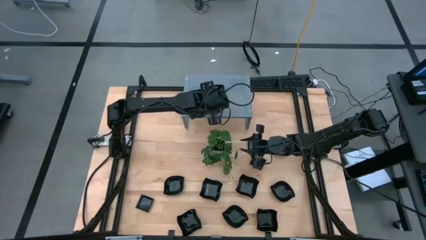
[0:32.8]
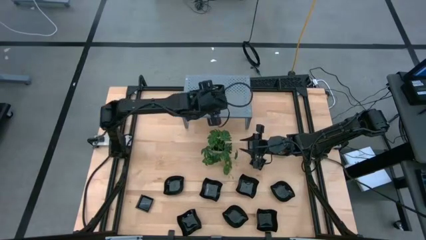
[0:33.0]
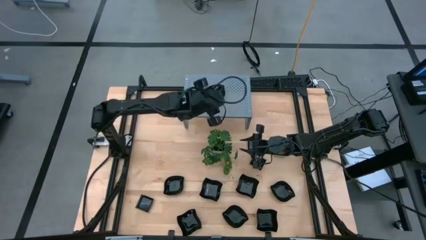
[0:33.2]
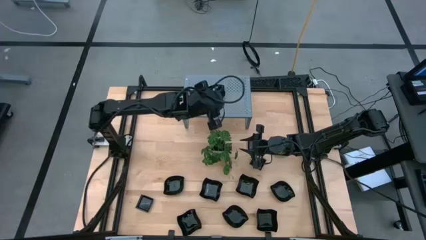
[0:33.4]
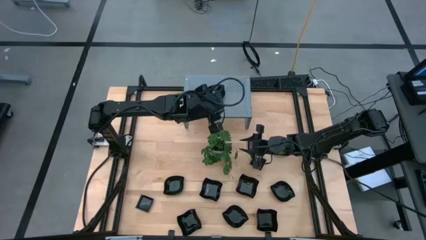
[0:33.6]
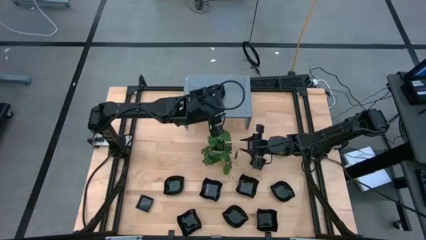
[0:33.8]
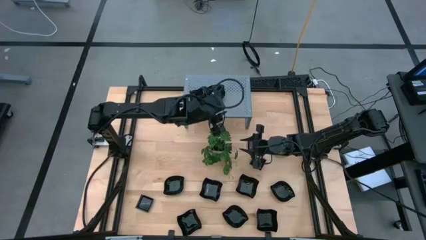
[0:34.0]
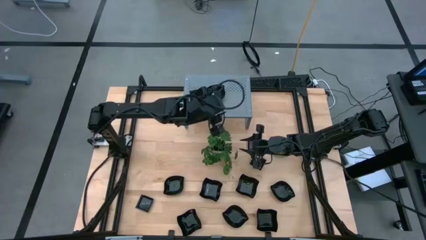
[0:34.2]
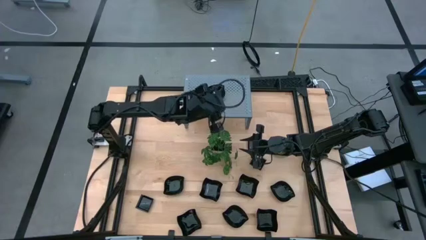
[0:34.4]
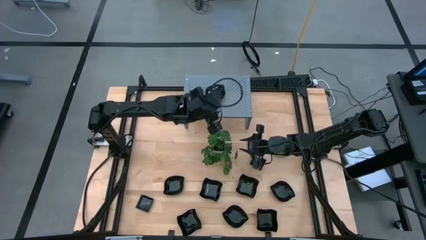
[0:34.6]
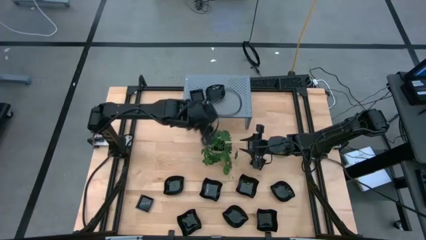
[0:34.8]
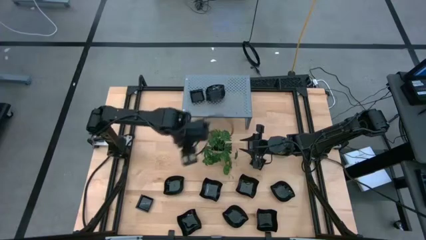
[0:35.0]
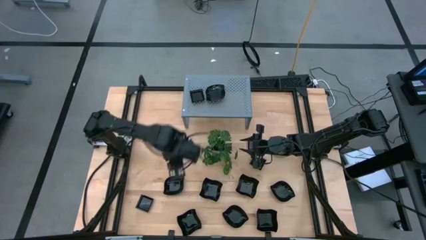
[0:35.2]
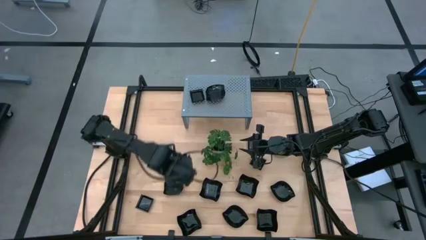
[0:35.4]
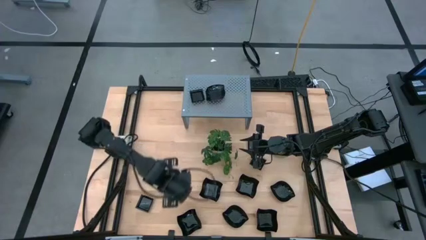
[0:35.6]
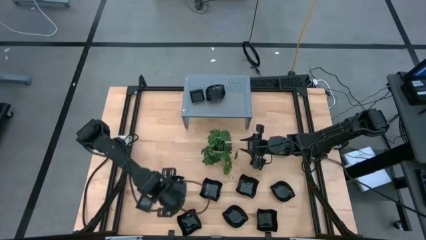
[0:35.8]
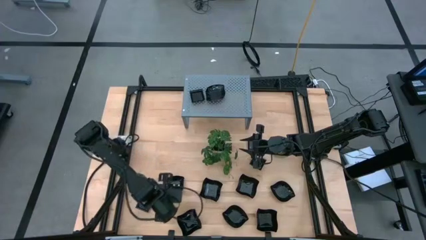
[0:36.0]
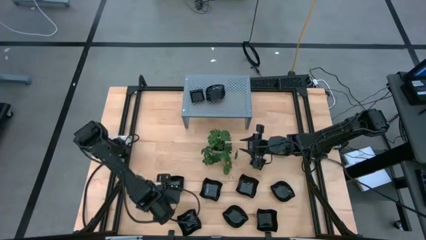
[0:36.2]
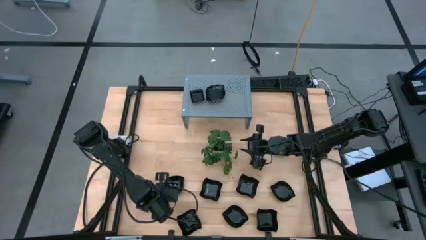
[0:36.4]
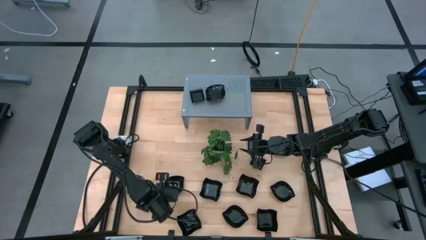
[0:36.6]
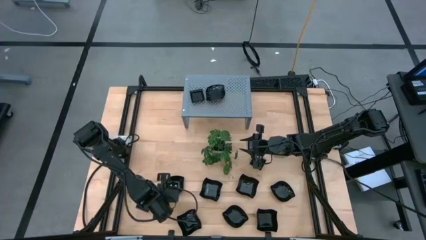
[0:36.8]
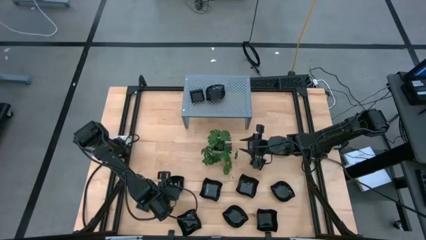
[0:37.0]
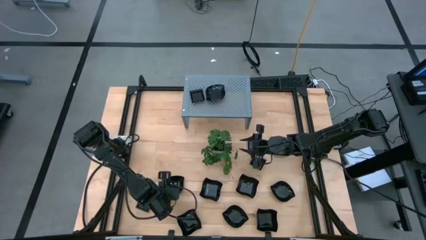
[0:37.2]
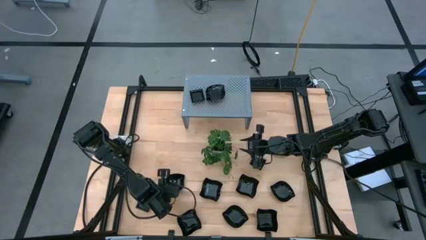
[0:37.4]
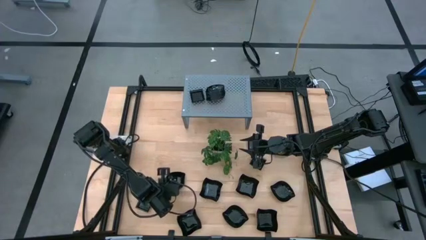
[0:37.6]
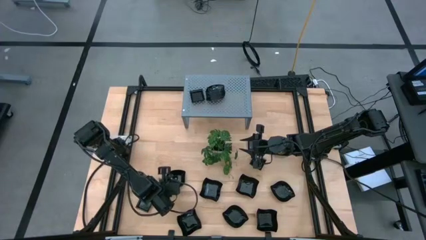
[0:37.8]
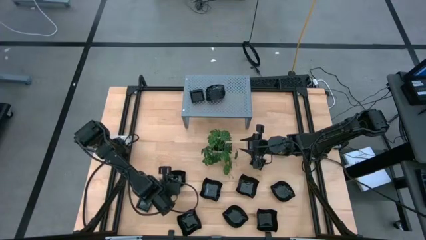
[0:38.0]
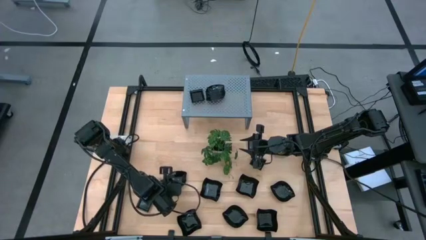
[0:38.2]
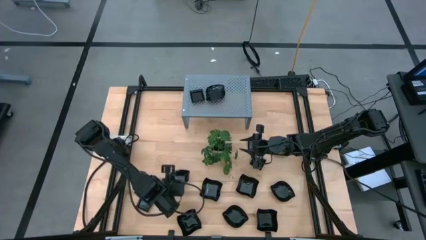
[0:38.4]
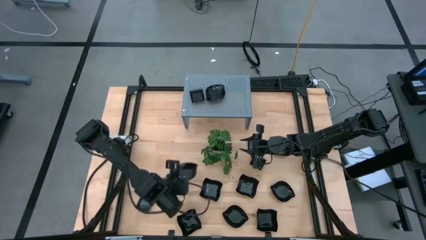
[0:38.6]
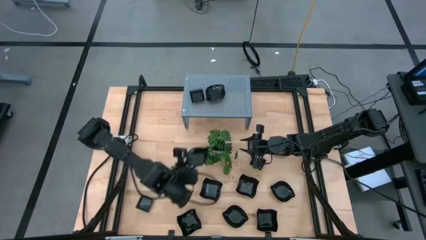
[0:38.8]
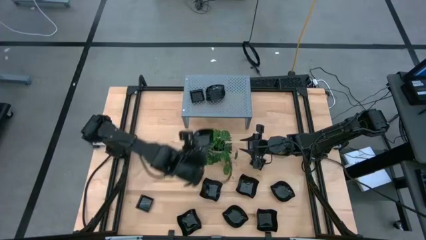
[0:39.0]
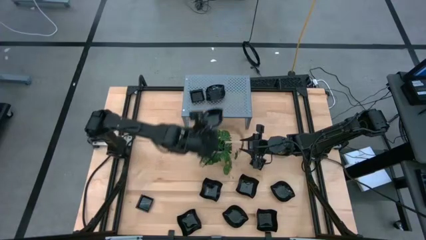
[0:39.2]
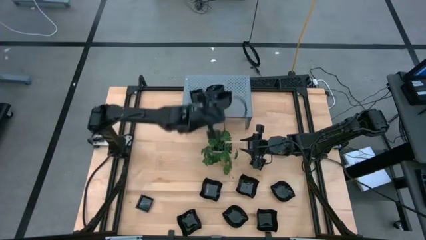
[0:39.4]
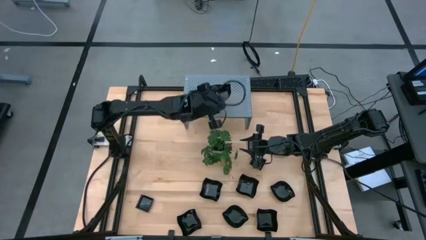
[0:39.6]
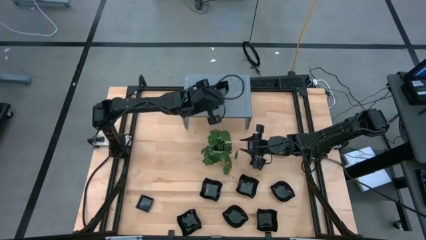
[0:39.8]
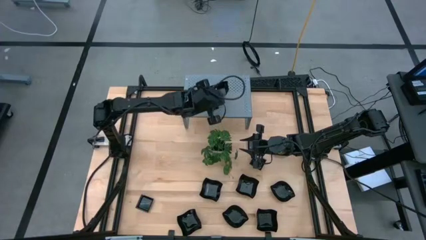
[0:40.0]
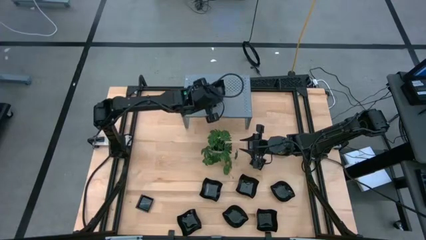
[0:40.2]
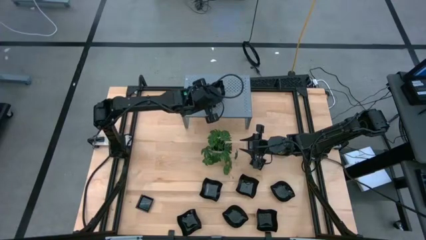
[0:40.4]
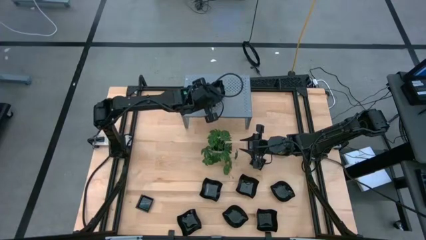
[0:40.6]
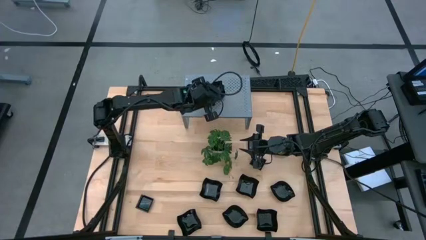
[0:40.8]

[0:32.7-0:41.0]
Task: Pick & Place Mini shaped plates
Stack the black leaf plate on top of the other black leaf plate on the shelf

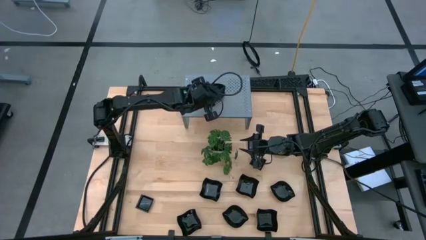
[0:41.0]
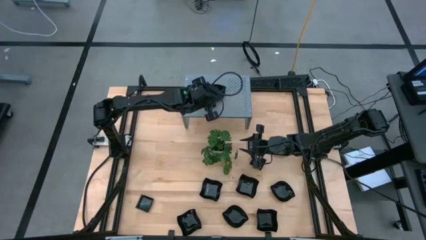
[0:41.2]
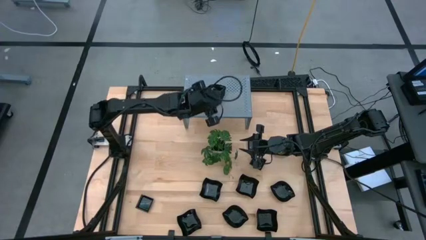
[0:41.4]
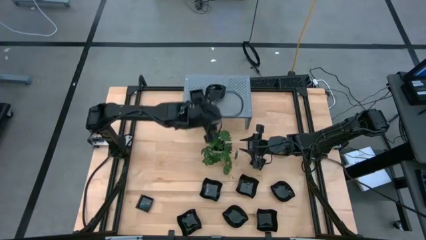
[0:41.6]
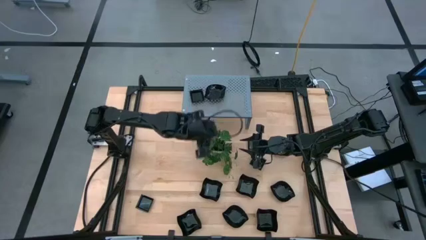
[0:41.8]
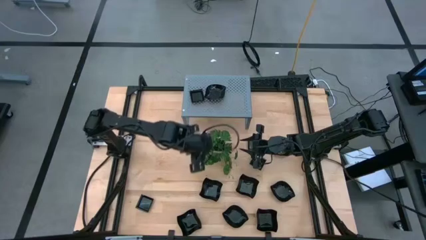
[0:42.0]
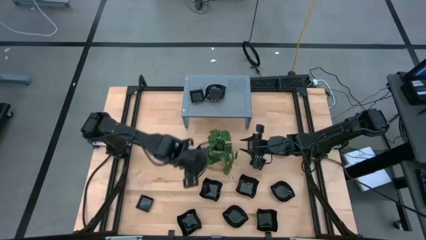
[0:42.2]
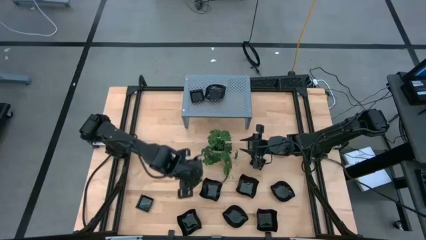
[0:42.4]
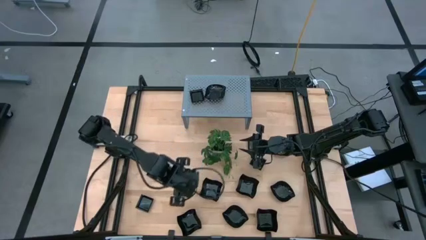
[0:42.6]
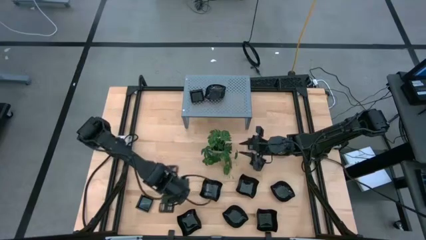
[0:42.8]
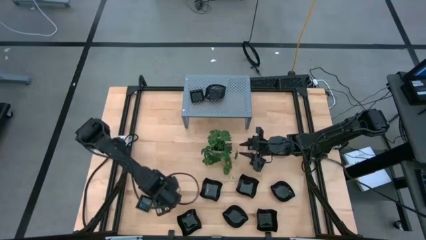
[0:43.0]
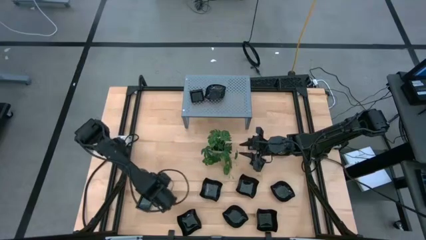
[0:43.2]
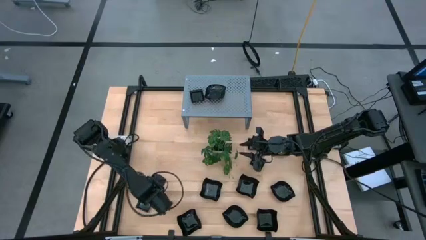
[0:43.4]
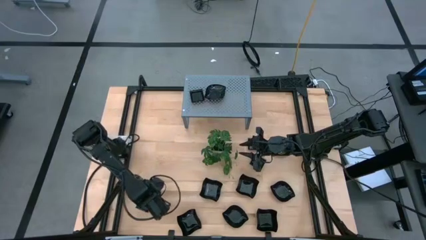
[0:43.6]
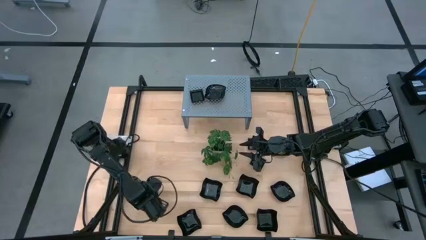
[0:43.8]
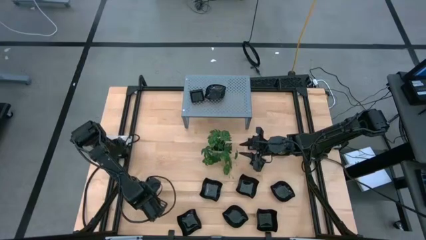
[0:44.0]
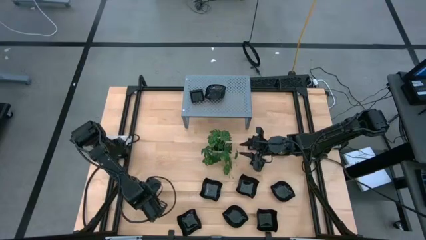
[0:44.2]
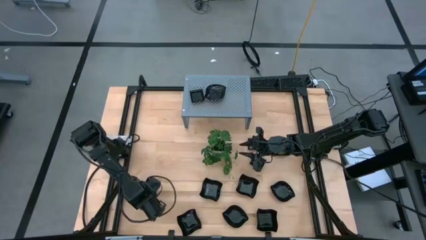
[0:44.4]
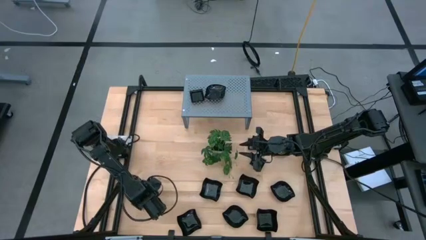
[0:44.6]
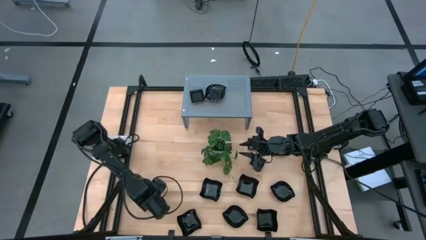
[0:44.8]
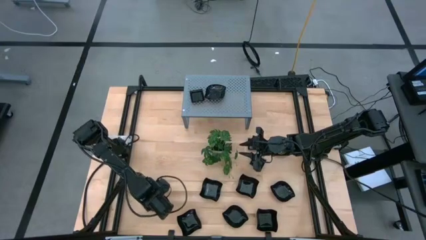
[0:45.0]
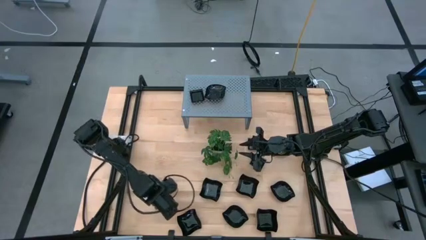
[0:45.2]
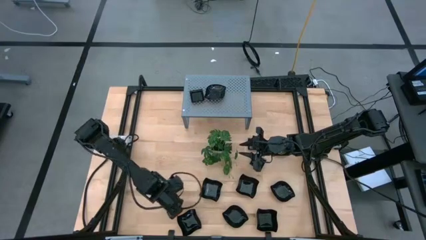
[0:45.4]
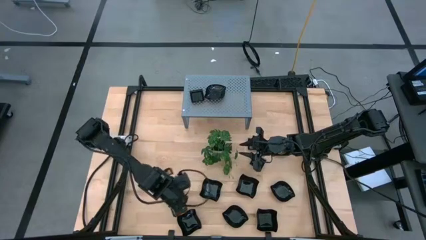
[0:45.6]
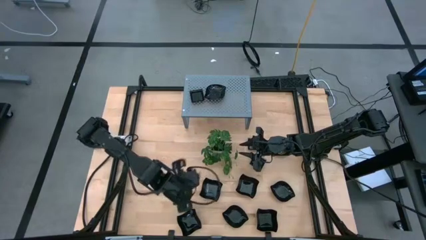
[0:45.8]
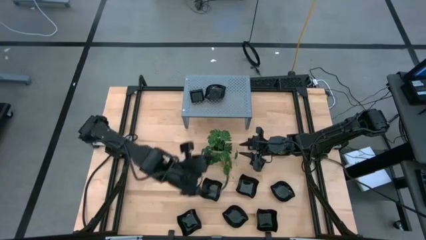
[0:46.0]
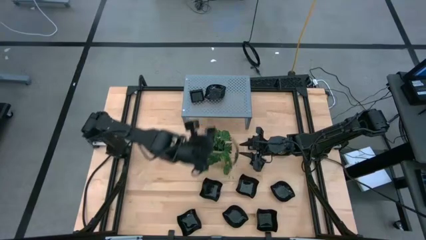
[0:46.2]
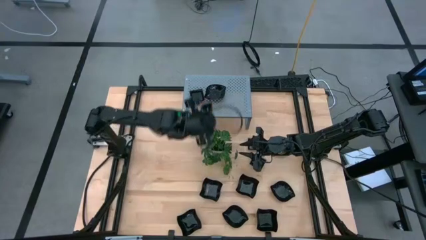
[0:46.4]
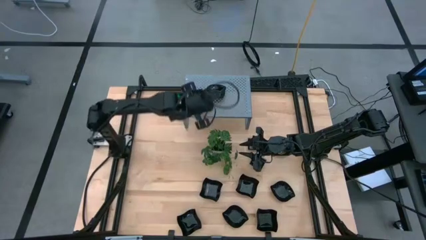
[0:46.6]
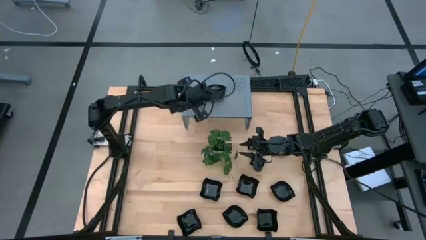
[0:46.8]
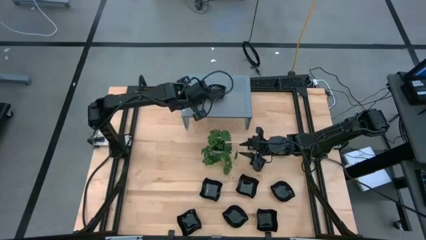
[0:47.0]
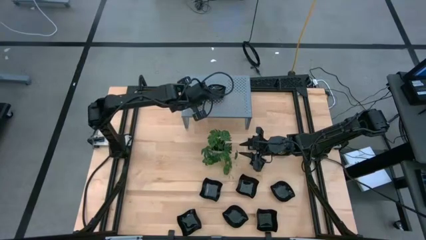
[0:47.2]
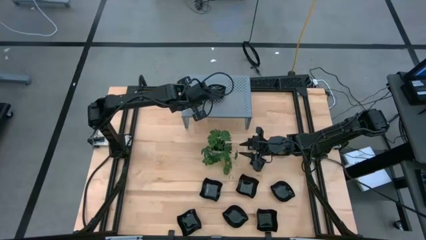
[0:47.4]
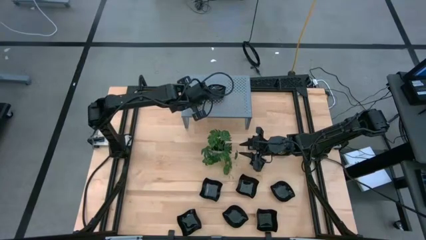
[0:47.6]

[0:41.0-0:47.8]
Stack the black square plate on top of the other black square plate on the shelf

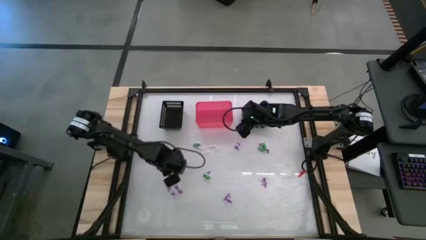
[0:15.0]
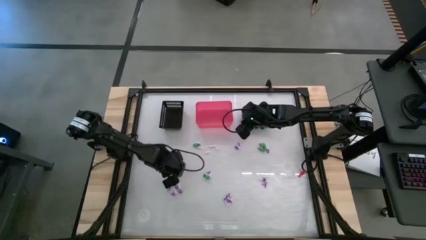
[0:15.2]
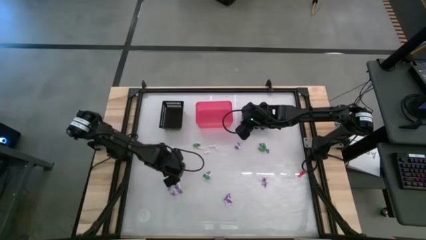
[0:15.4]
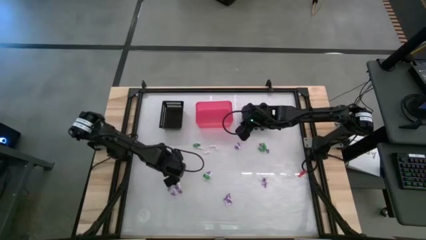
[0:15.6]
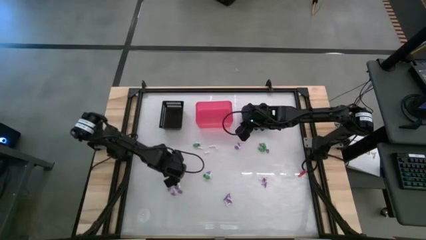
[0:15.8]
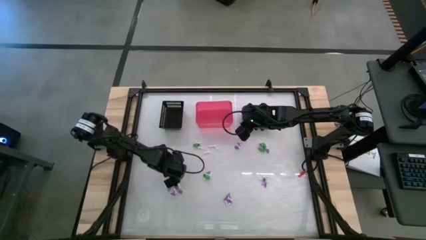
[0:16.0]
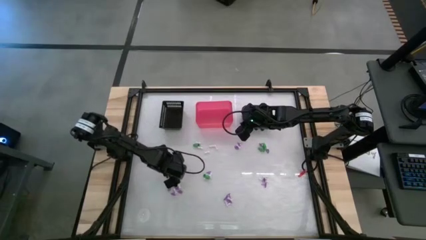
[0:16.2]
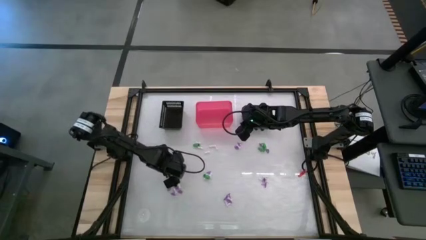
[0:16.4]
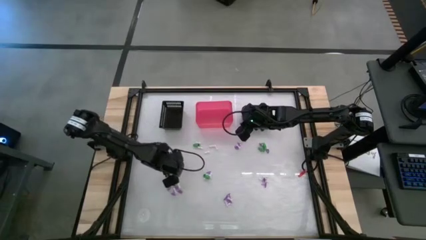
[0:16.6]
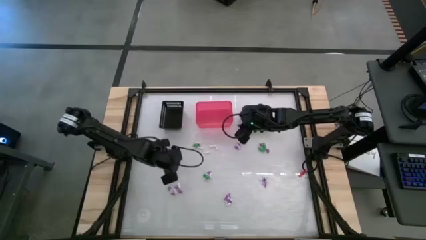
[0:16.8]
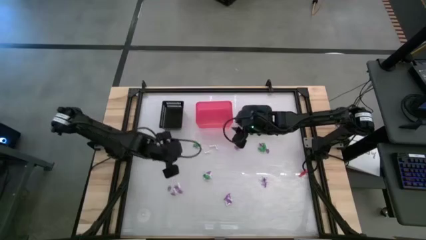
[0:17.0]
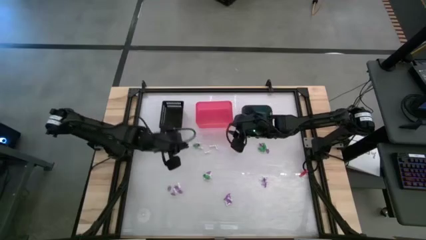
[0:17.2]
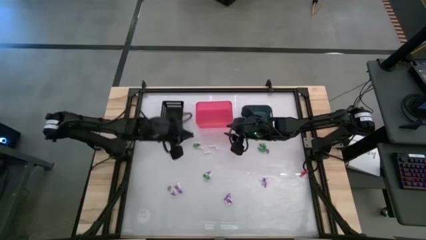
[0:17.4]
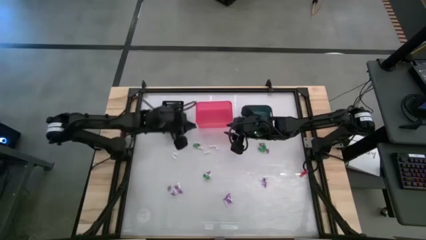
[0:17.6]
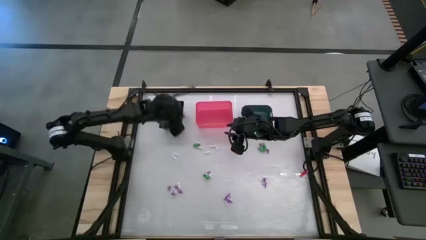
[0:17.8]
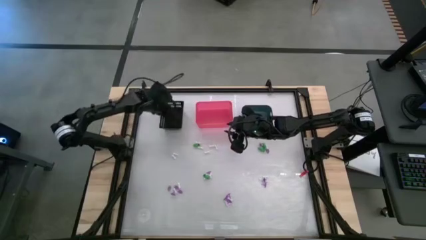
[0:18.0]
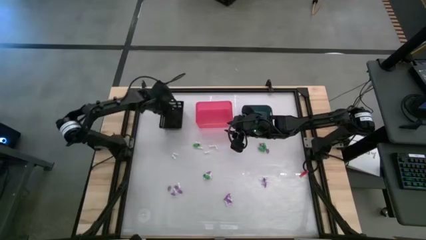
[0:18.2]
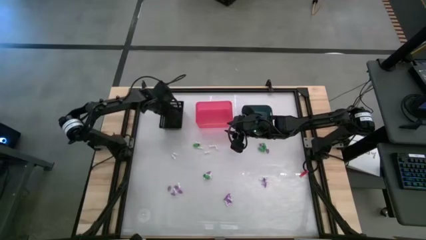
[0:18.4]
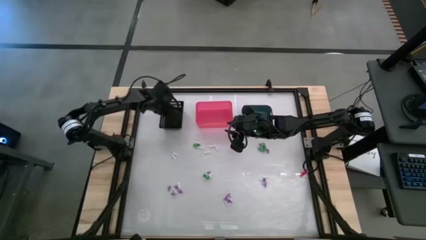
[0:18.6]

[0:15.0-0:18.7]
Task: Sort Halloween decoration
Put the white bone toy into the black bin
